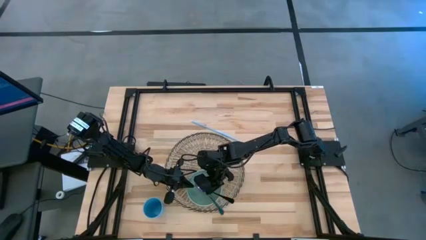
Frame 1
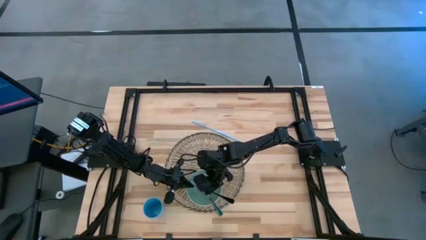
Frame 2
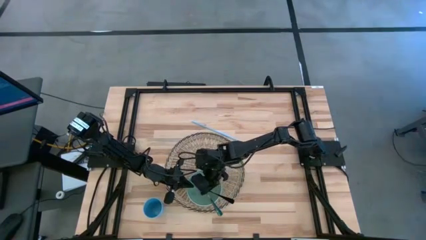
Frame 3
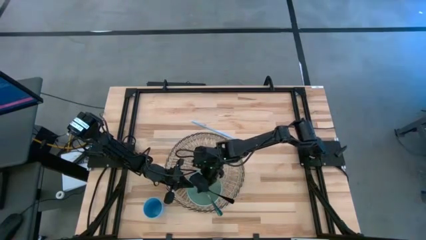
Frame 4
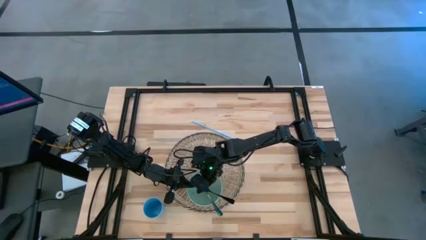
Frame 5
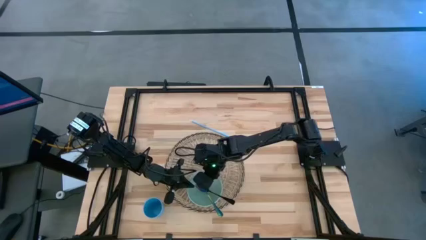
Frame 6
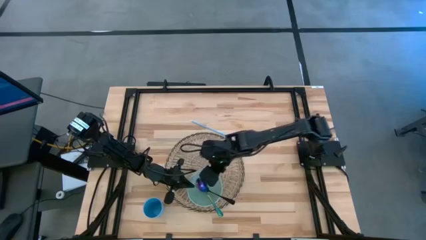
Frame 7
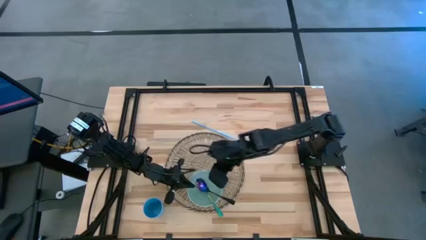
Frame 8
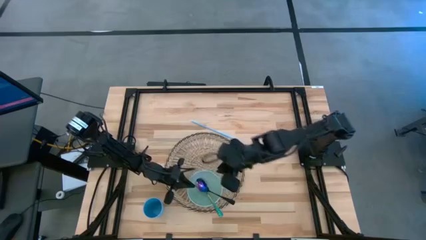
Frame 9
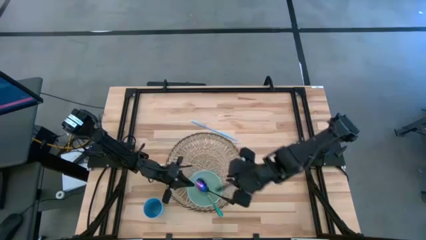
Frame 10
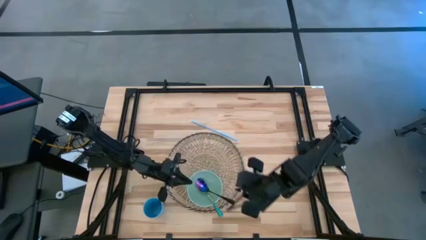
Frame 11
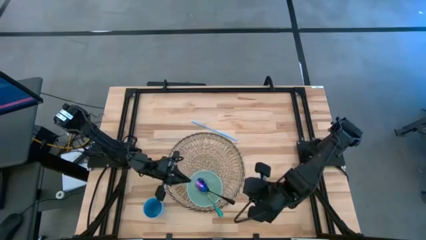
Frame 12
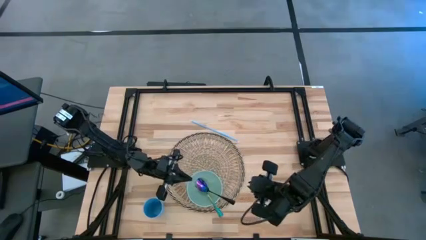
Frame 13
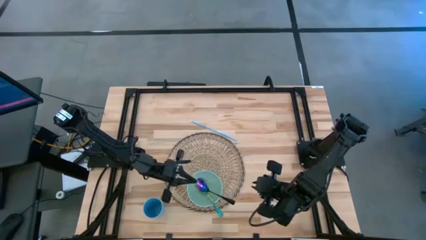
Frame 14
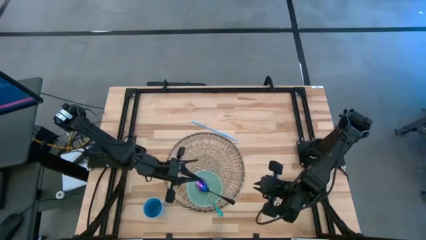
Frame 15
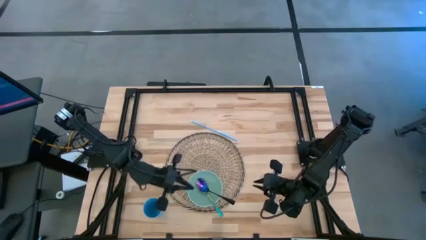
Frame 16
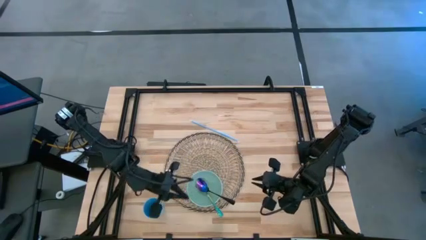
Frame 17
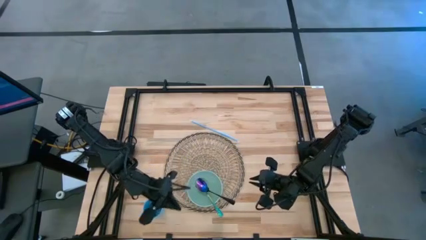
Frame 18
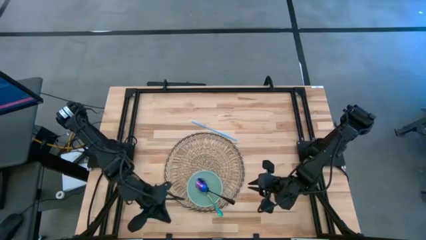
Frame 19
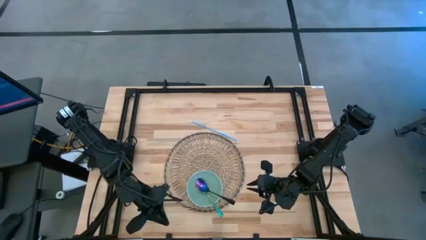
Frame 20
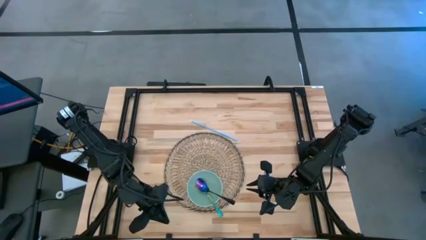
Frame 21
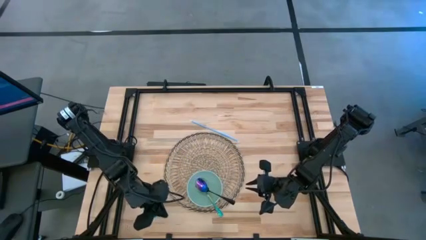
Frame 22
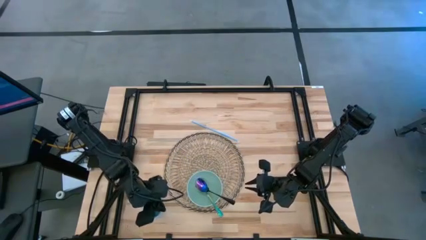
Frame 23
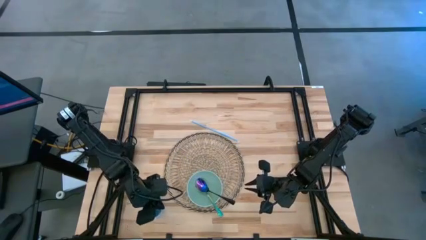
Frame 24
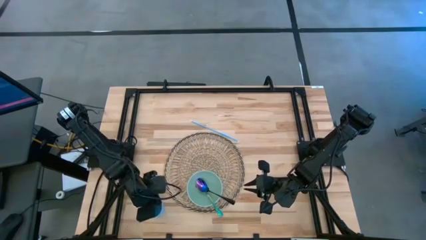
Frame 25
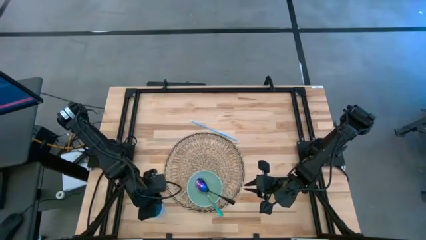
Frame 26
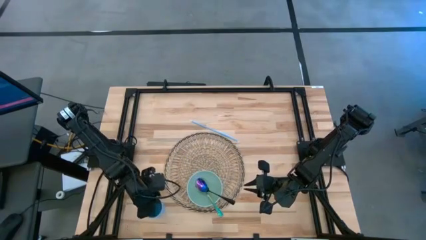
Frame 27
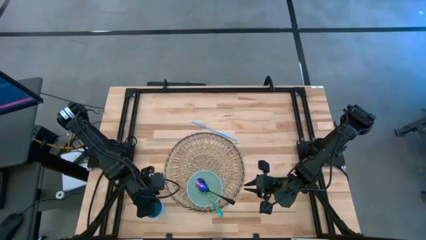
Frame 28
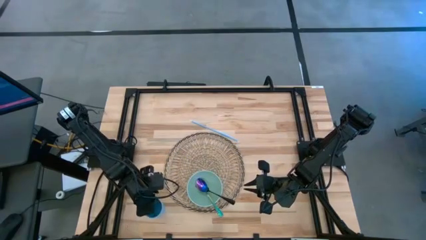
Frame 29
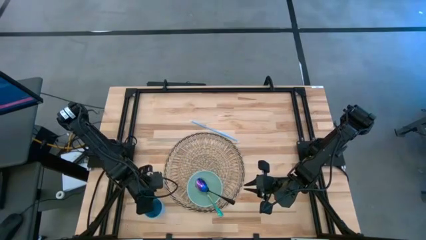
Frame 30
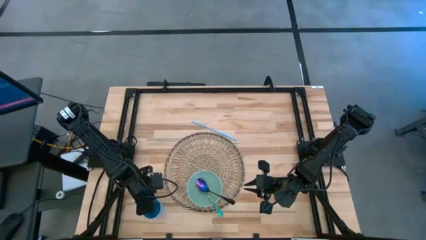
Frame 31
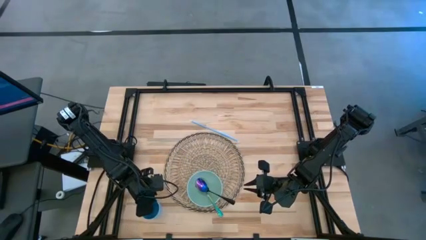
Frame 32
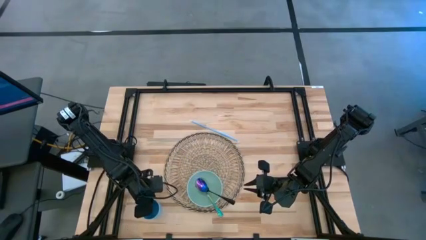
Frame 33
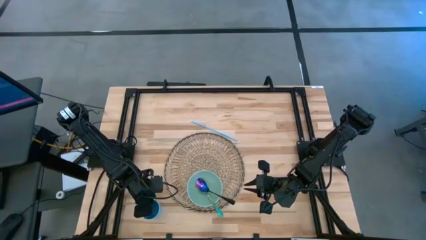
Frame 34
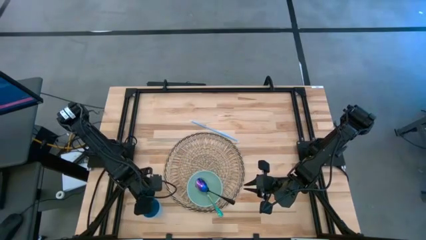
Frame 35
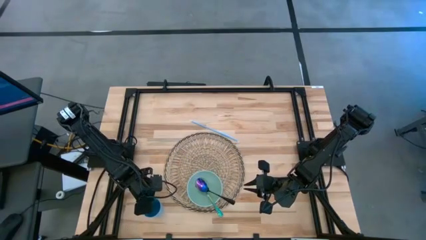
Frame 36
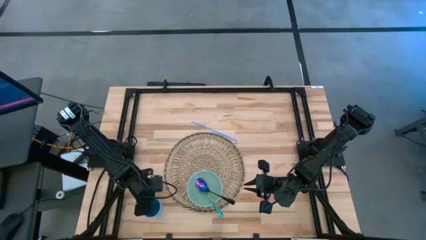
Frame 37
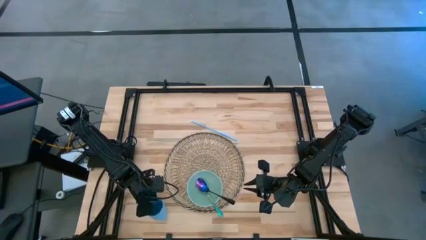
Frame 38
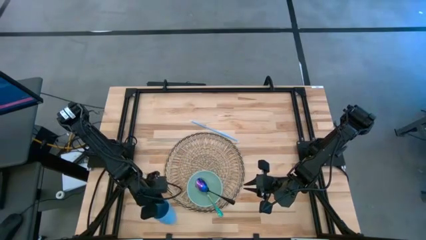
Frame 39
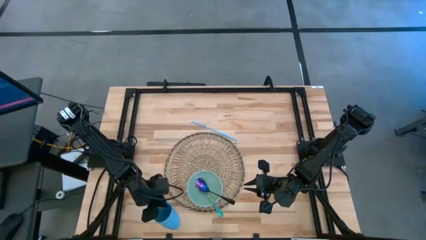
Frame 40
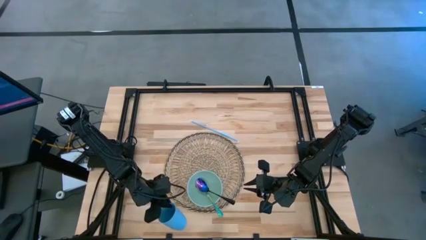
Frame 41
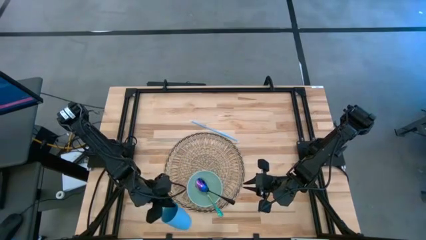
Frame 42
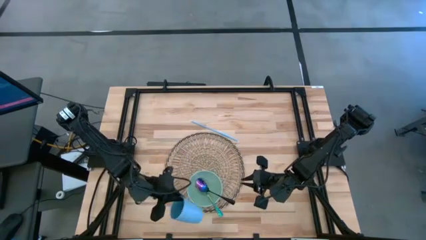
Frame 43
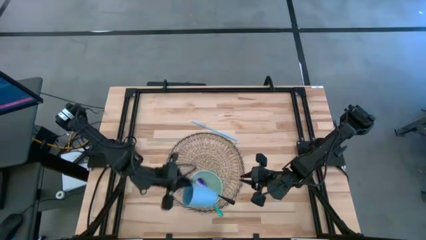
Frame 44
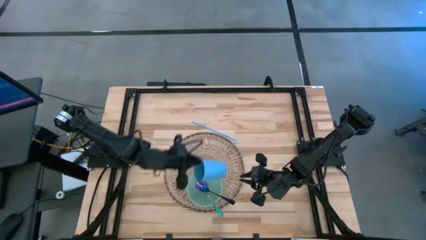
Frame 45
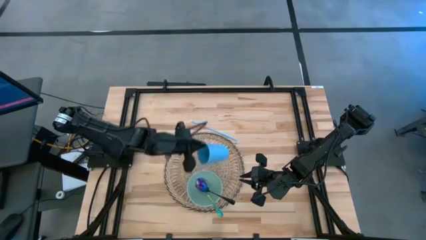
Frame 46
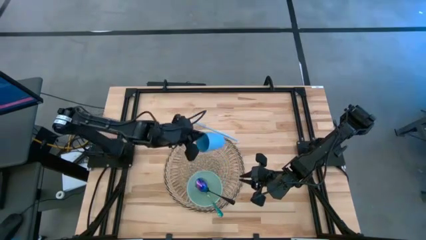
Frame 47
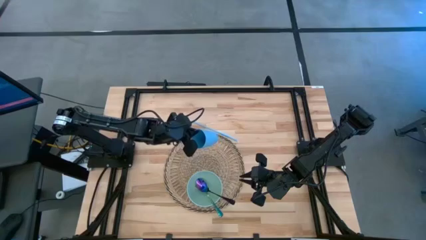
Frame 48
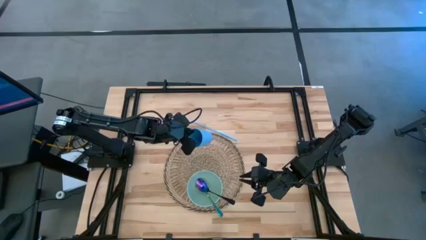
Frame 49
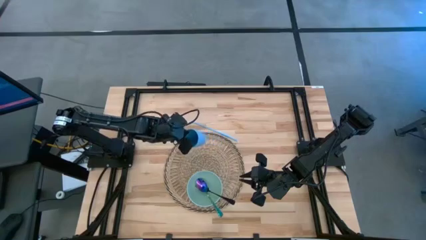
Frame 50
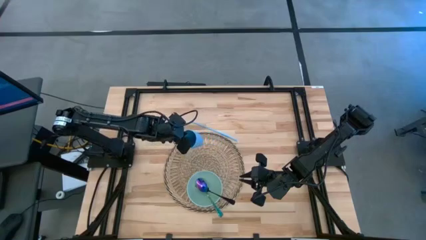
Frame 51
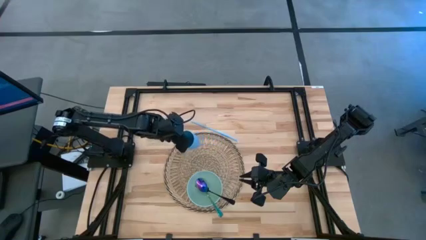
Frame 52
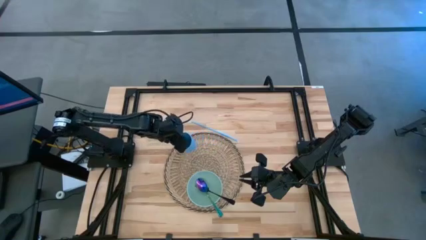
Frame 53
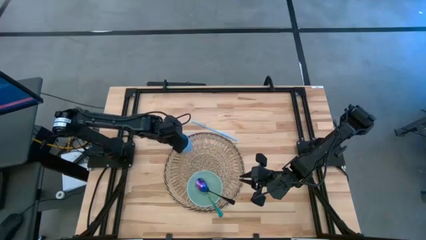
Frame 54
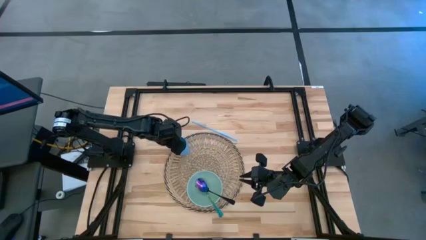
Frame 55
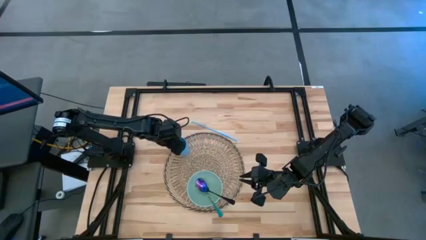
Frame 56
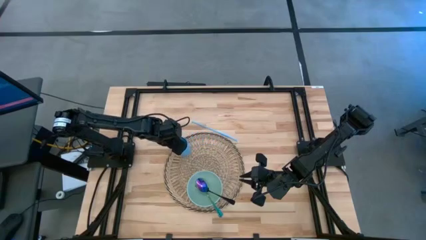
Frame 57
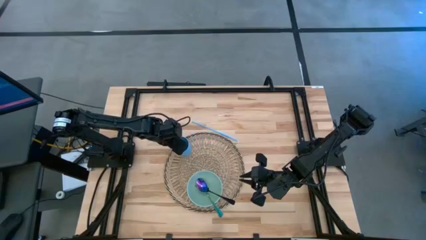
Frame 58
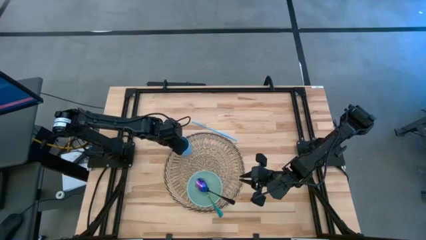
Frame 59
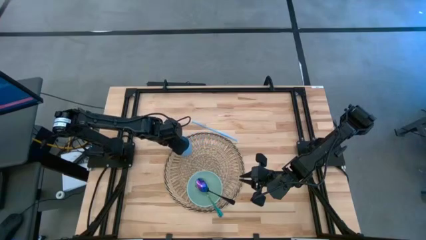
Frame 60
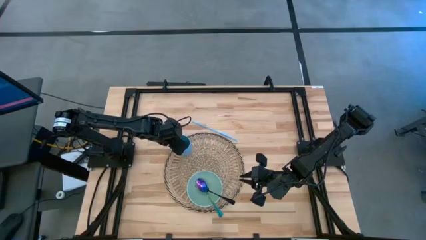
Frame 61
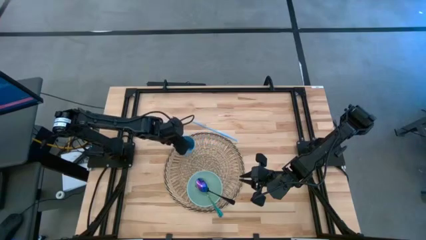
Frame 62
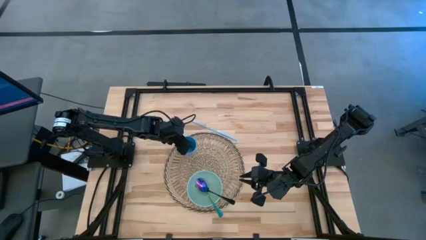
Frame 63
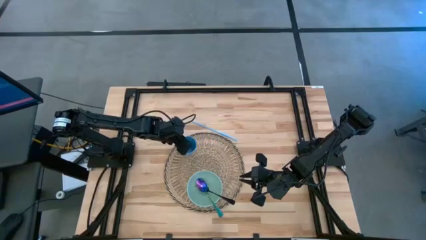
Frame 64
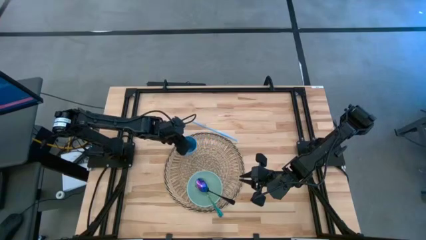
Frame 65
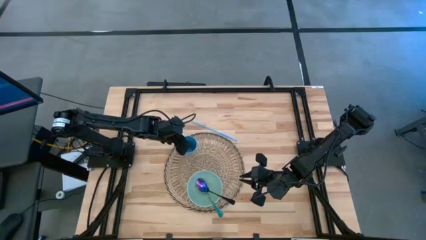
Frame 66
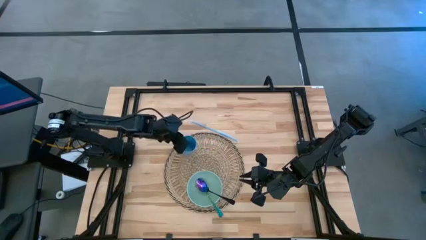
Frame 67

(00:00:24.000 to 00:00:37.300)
Task: Pick & Place Utensil
Put the blue cup on the brown mat to the top of the the green bowl
